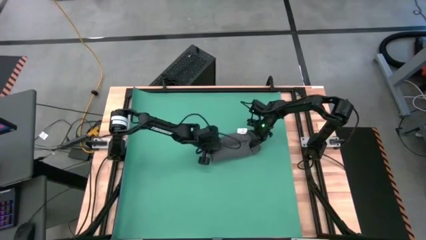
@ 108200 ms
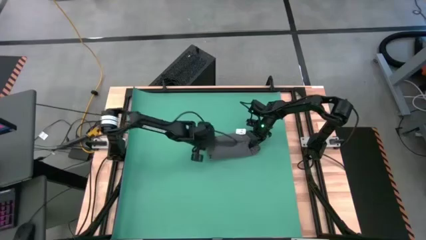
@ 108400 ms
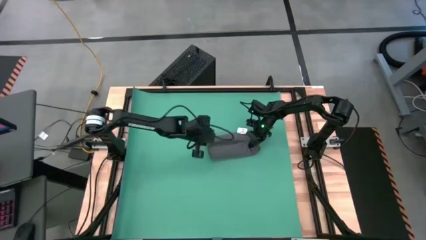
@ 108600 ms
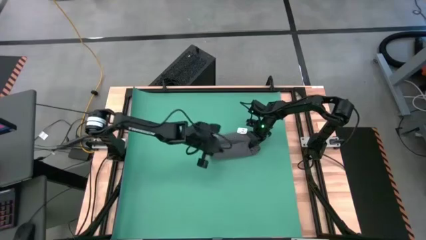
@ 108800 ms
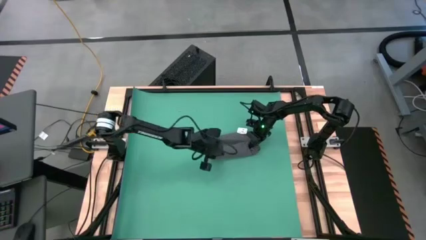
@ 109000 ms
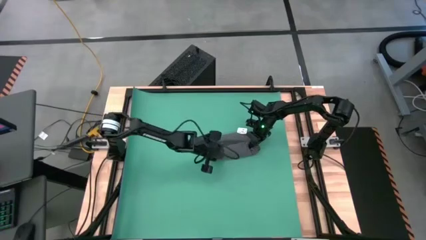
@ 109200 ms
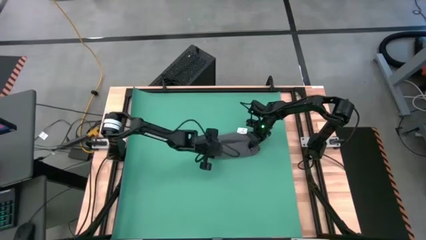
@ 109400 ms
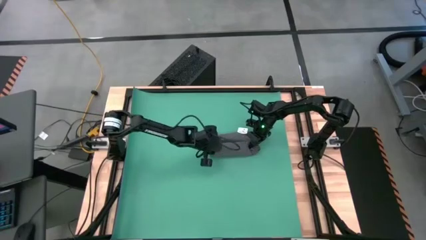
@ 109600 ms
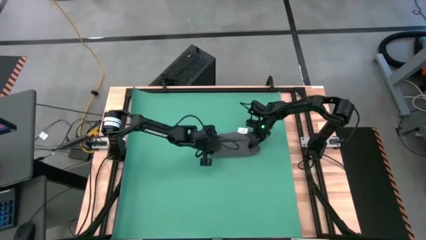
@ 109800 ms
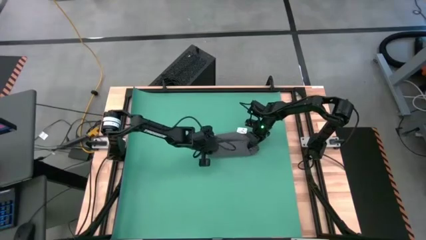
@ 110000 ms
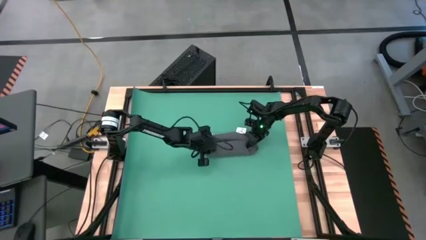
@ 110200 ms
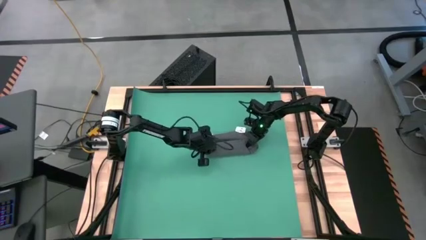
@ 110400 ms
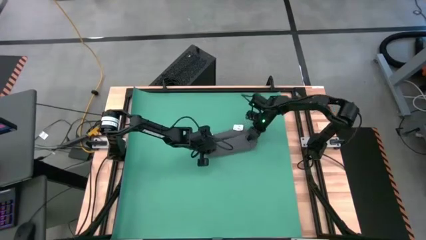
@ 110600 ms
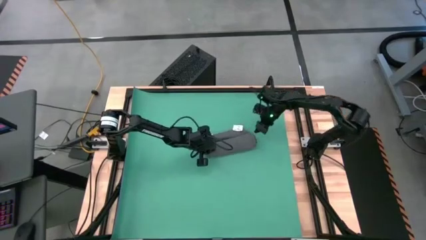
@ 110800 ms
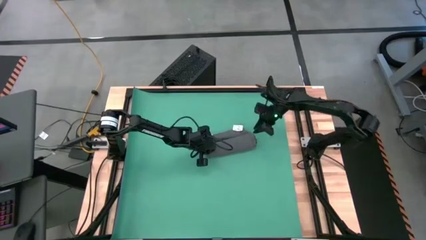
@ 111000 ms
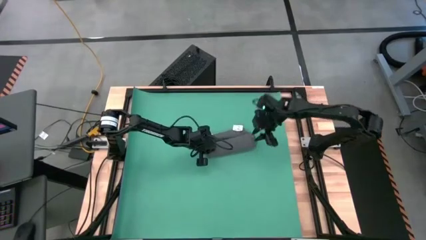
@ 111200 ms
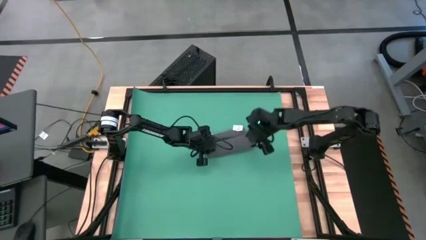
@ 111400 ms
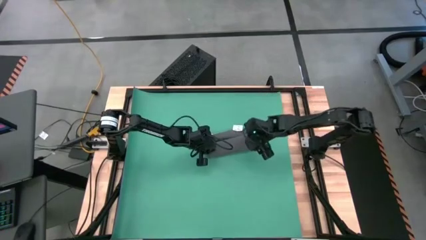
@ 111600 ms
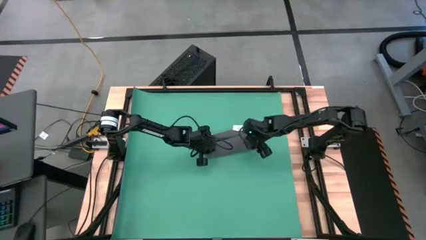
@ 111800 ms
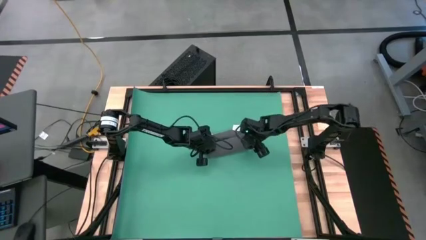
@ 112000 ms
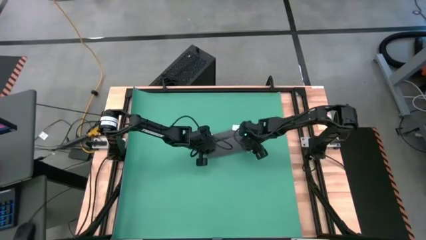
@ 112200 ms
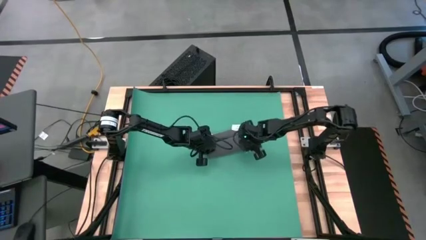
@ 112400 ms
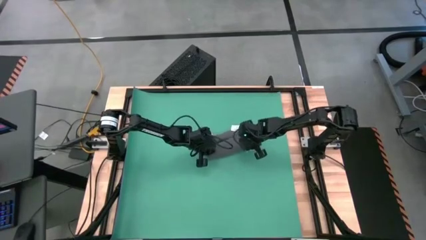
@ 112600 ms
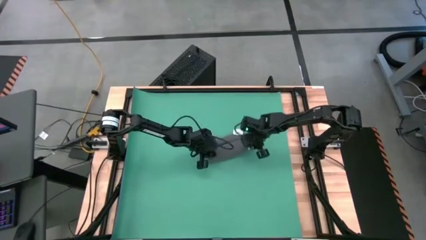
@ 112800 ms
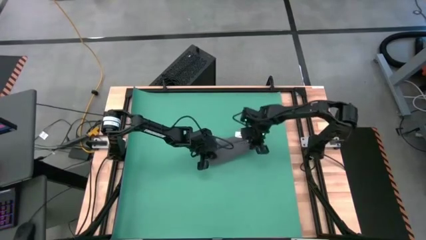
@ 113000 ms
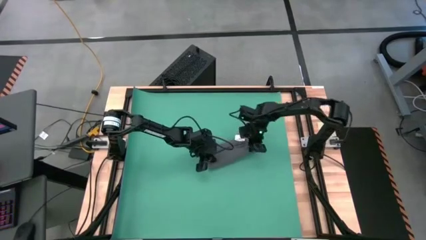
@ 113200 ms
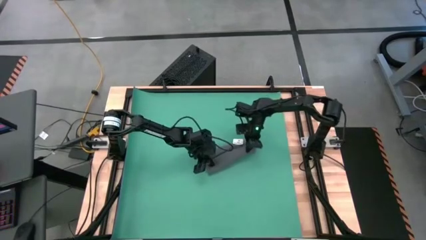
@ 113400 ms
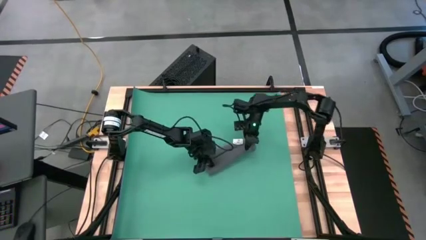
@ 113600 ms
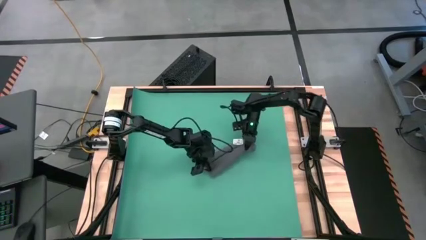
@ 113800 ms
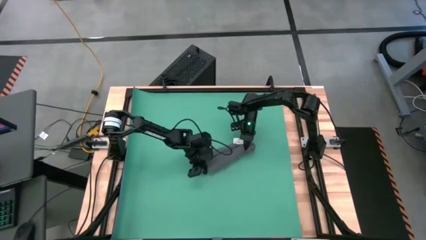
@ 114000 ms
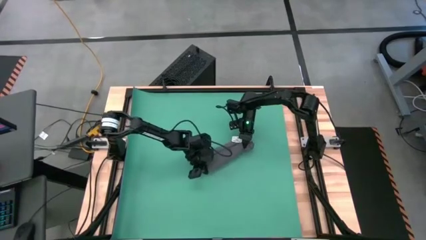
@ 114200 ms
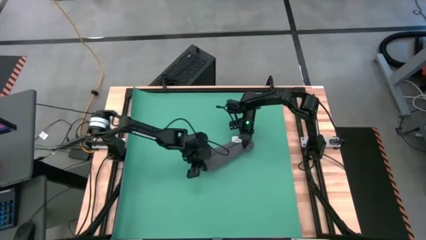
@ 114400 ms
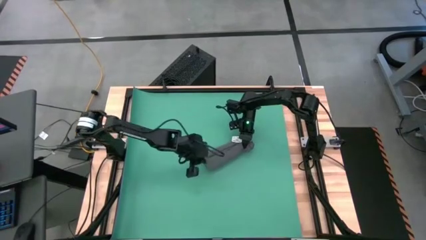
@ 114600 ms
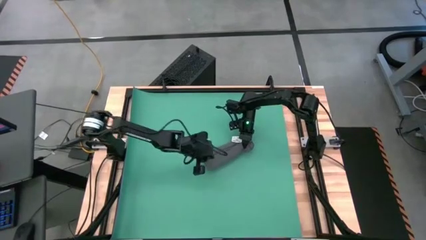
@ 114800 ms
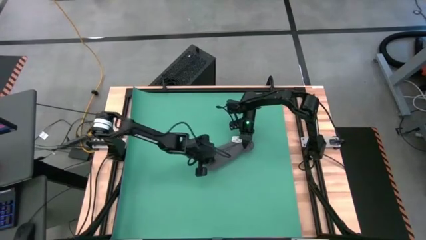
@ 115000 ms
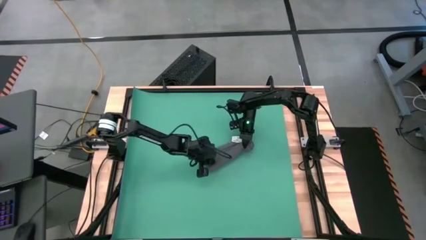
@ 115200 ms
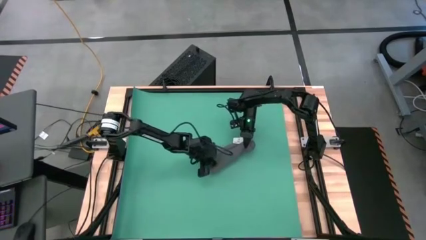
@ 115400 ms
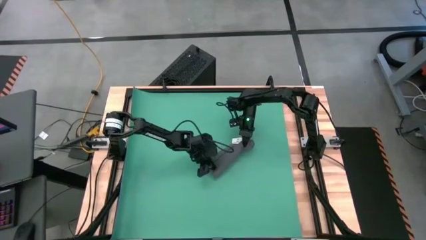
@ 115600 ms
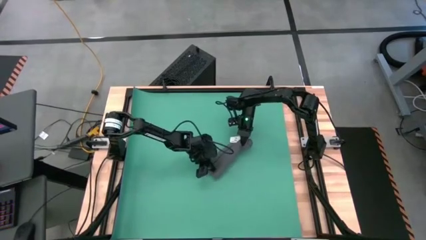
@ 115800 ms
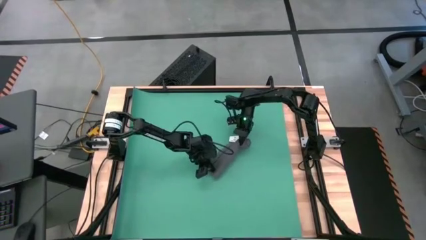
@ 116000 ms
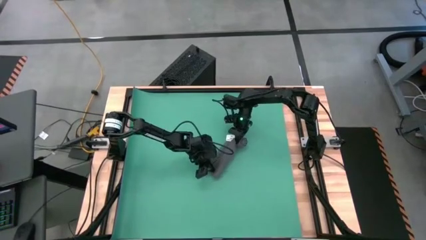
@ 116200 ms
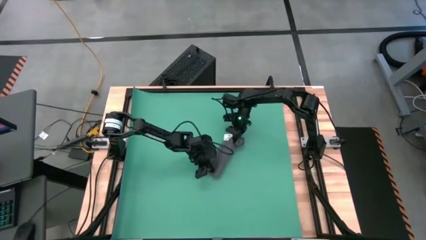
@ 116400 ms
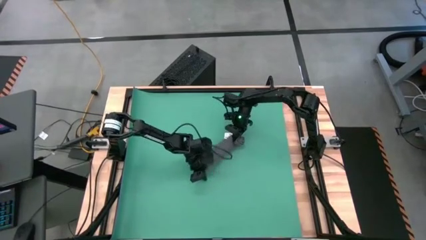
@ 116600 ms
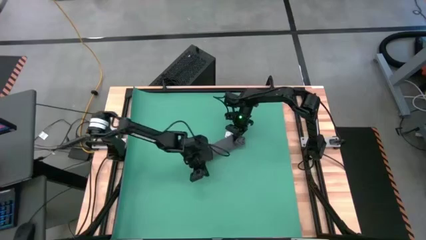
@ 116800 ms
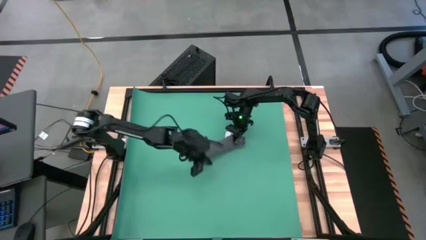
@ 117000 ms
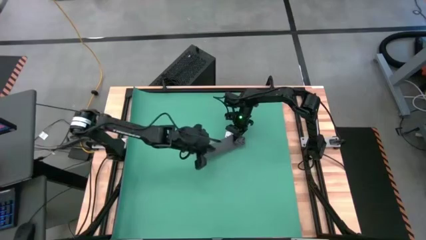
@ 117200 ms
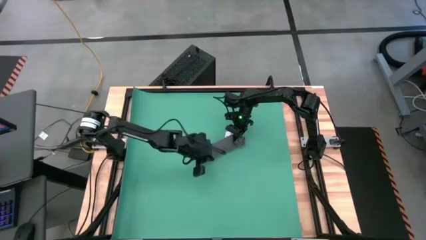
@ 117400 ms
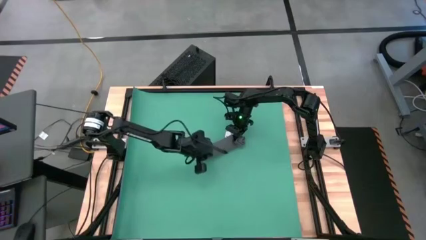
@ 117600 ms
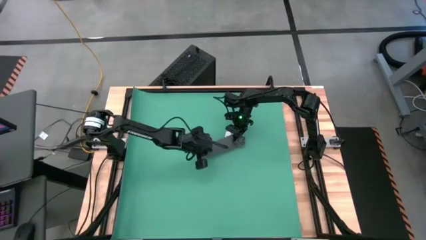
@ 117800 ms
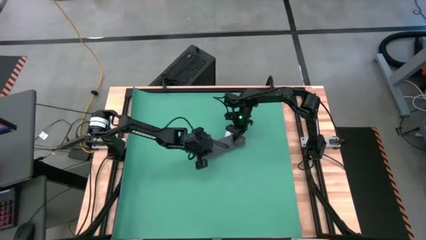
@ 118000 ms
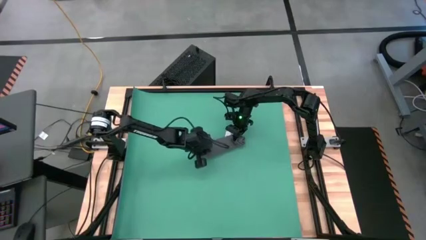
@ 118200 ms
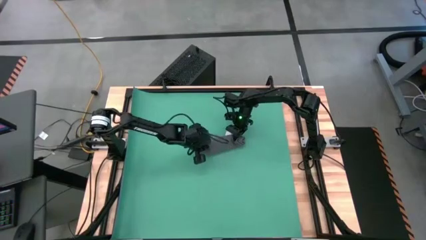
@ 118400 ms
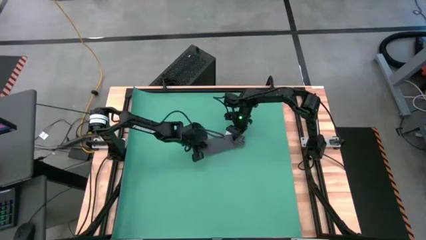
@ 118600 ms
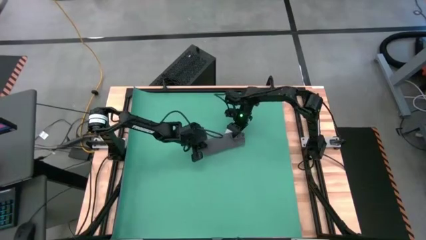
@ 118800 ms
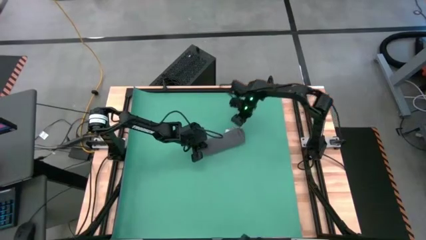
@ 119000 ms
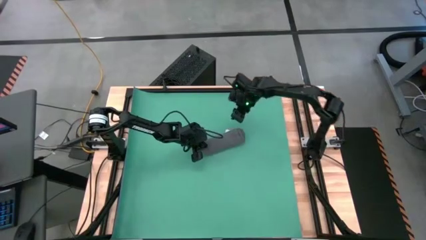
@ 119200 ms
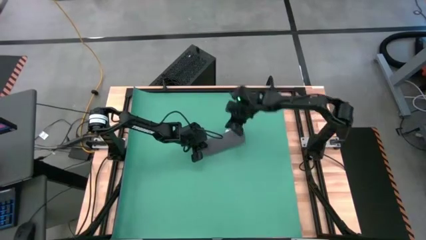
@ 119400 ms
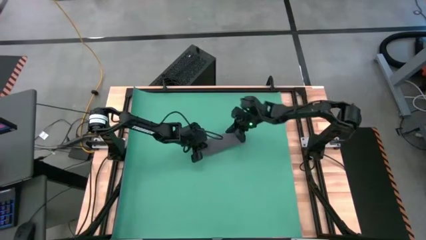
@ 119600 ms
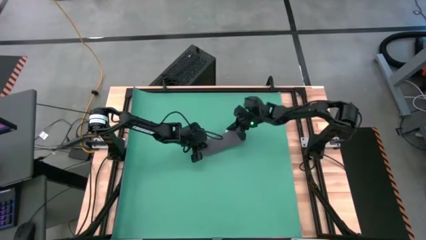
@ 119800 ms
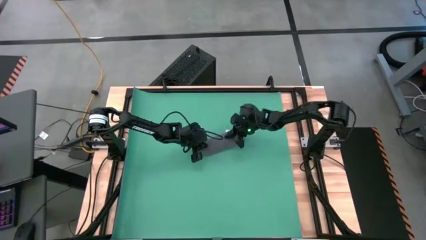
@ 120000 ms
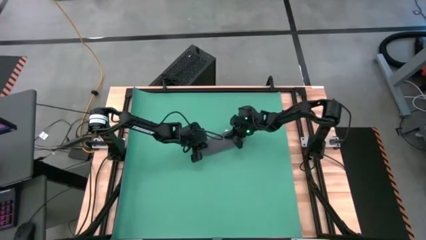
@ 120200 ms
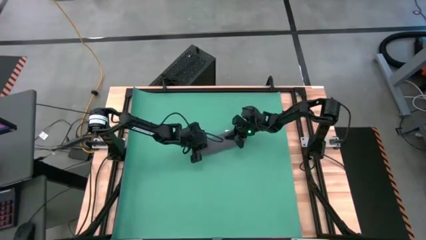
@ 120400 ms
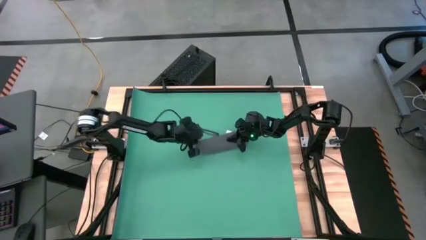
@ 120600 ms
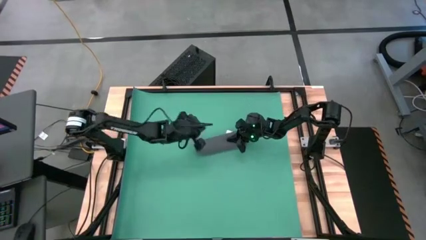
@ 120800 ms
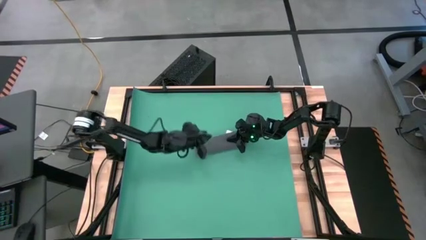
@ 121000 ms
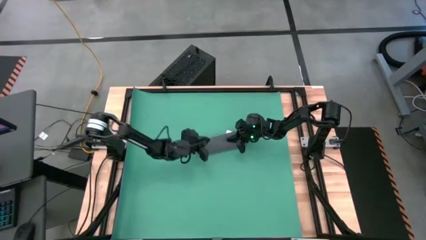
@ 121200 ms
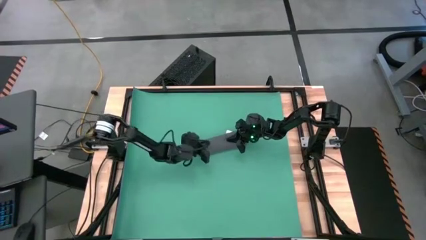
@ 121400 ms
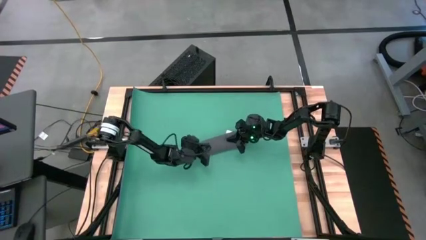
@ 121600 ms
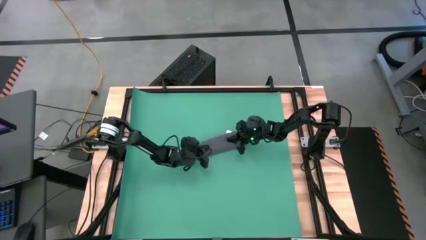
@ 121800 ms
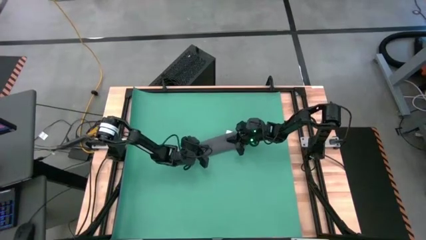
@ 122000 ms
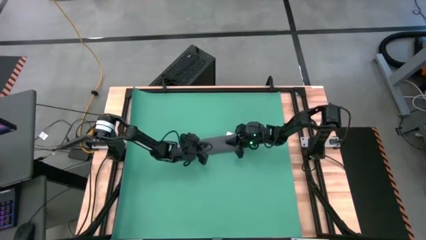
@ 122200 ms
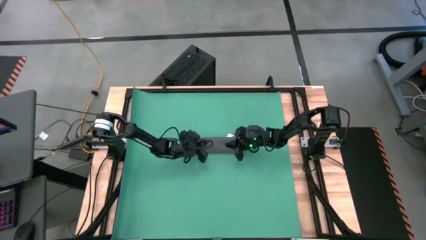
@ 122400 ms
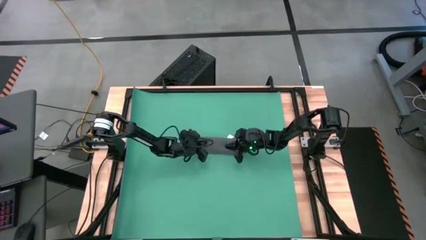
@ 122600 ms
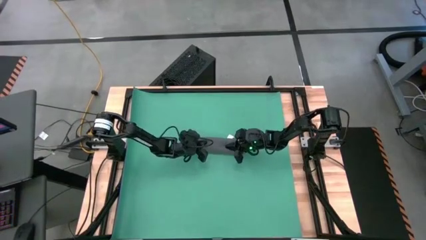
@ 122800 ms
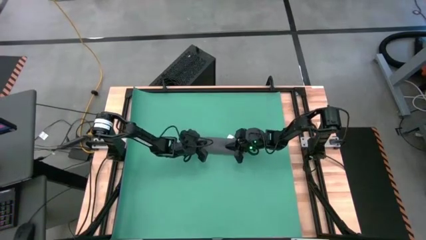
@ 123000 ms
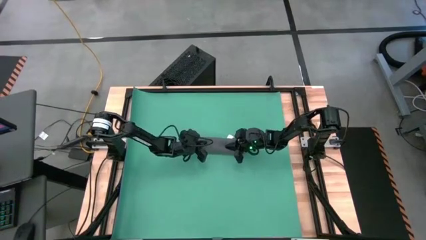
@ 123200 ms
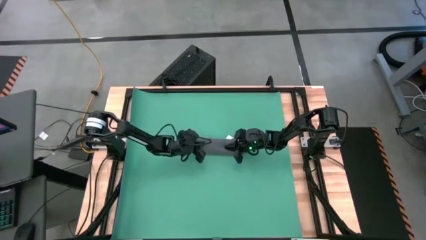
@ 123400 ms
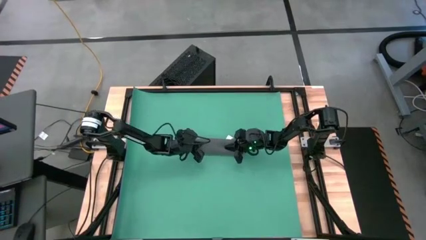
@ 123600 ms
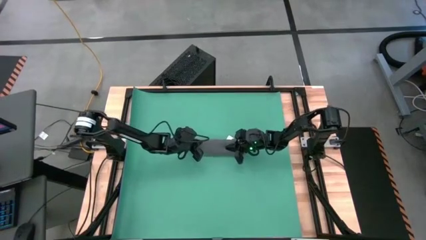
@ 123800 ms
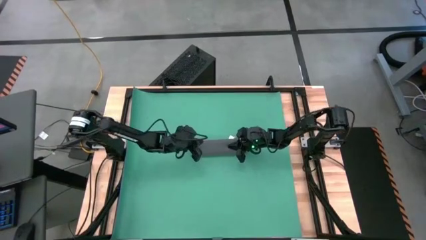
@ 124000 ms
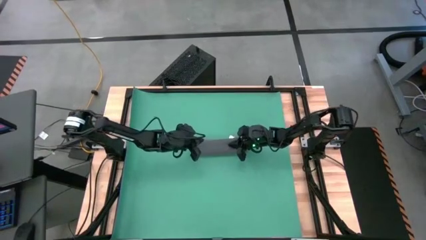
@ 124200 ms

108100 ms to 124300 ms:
Task: Roll towel
Roll the gray towel
